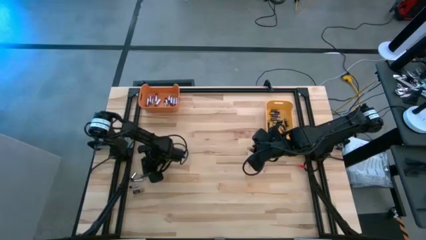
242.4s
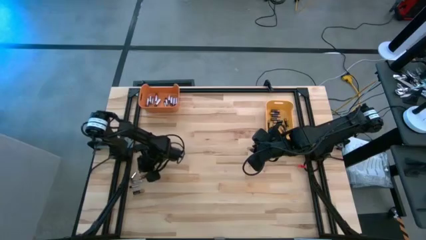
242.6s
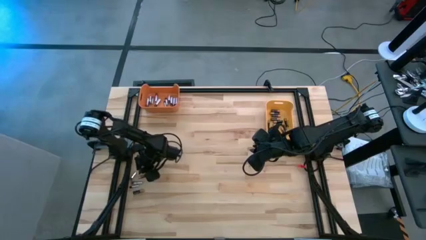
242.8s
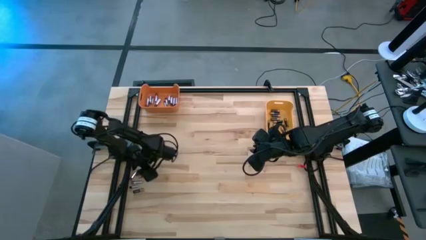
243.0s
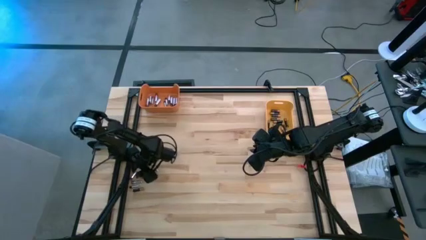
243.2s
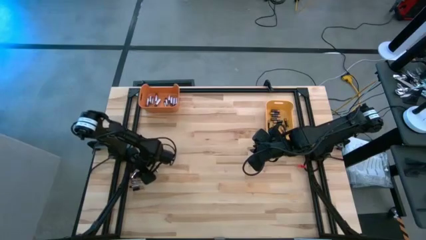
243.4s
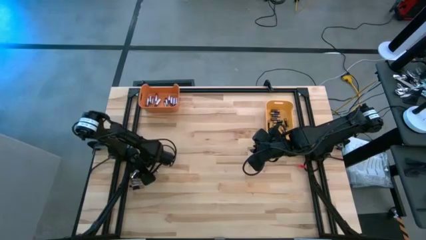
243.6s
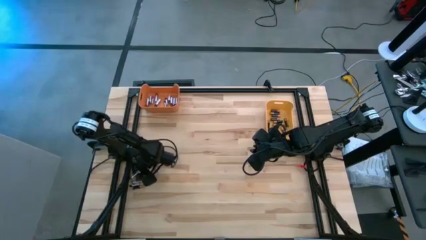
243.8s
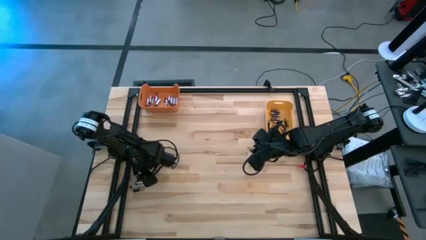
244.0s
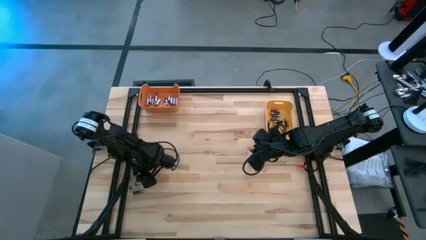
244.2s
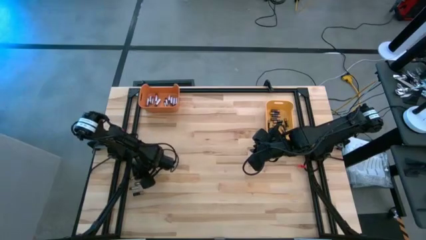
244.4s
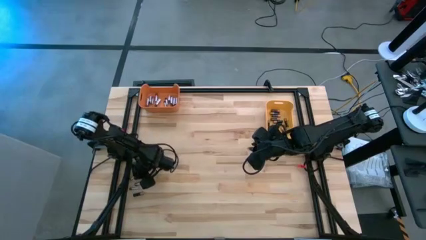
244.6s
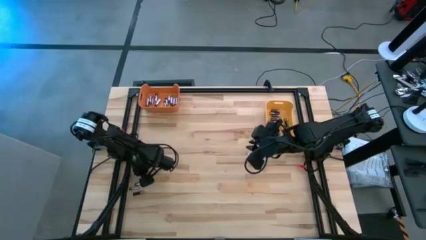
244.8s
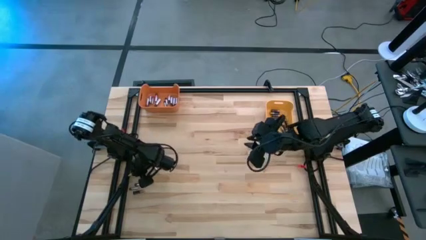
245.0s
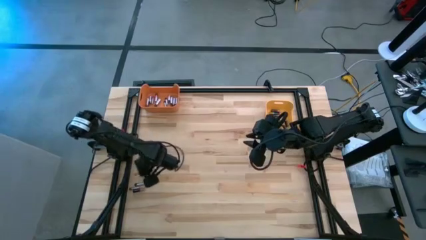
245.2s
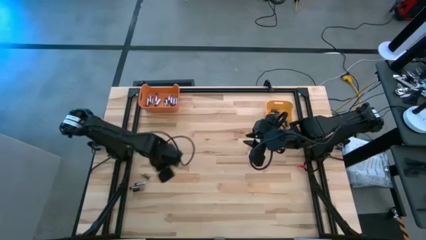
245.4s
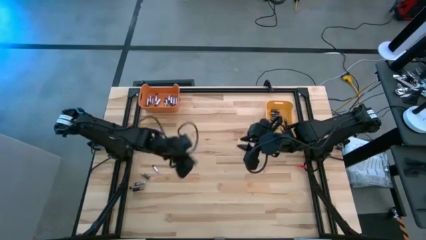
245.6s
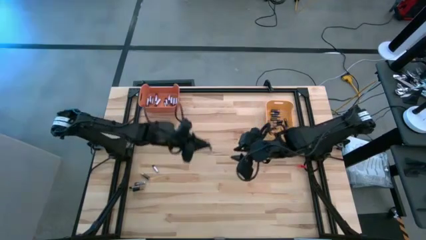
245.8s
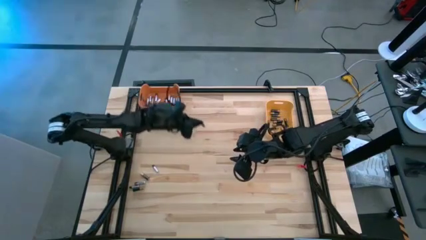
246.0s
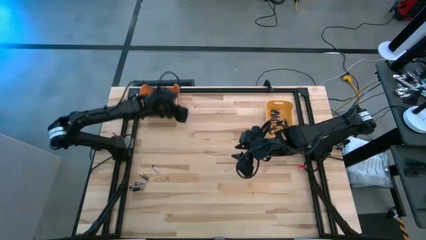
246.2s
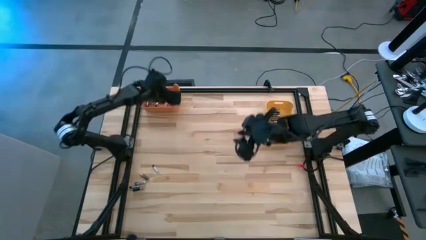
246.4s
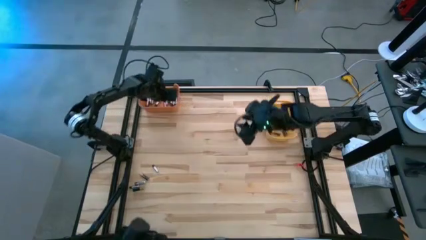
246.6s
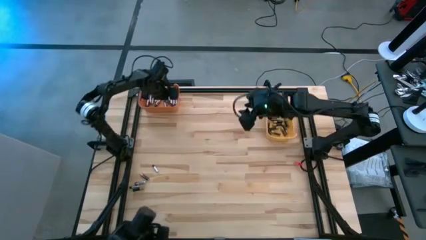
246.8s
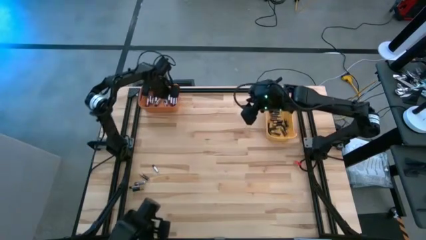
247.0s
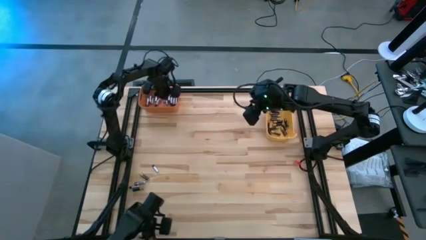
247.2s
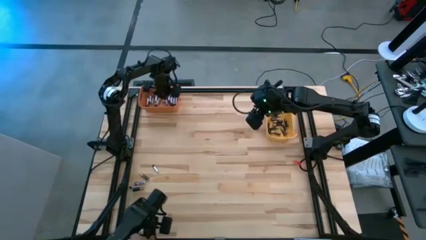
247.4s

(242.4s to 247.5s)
Task: Sort batteries
Put the silver battery into the orange bin

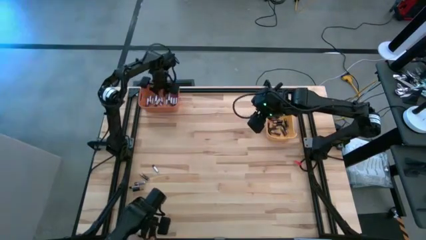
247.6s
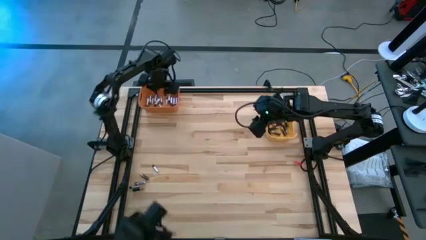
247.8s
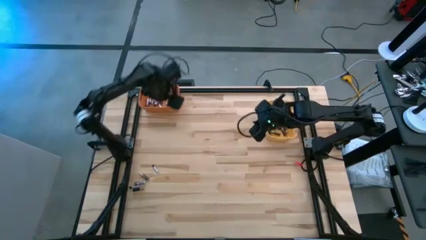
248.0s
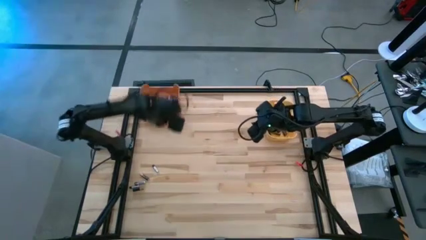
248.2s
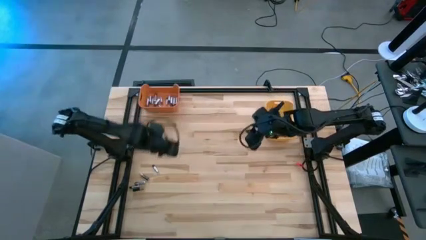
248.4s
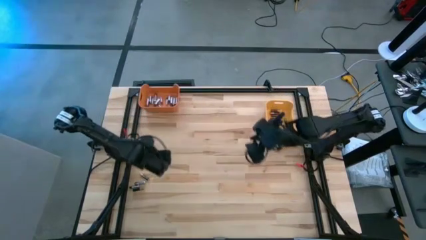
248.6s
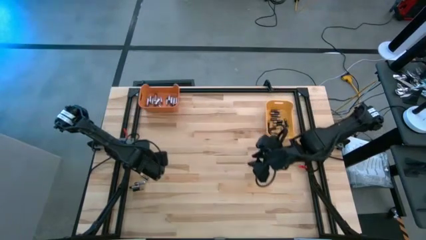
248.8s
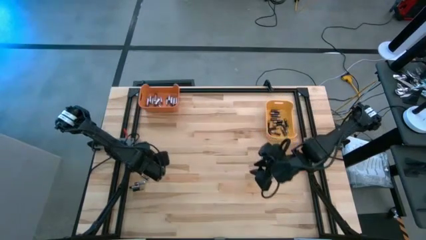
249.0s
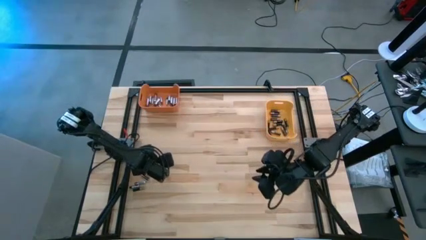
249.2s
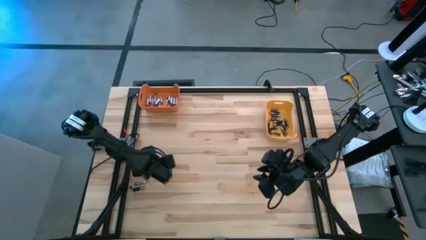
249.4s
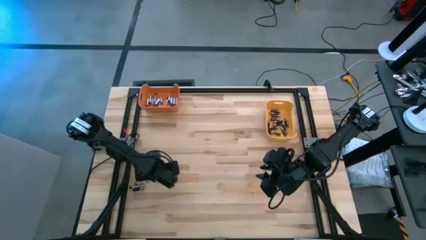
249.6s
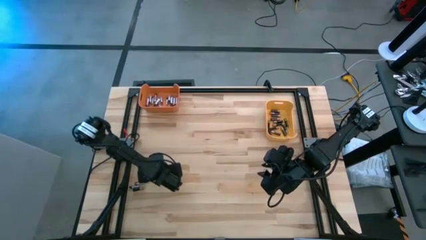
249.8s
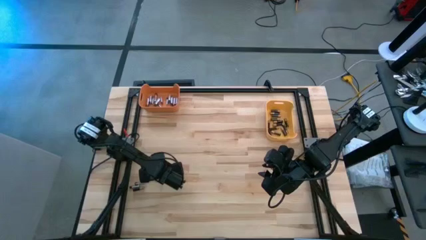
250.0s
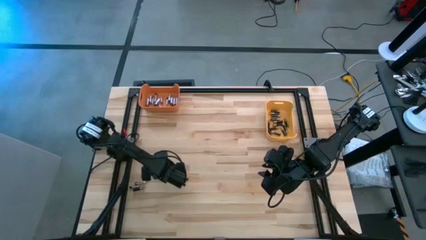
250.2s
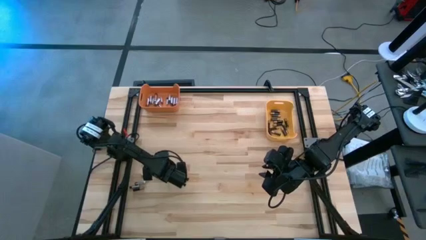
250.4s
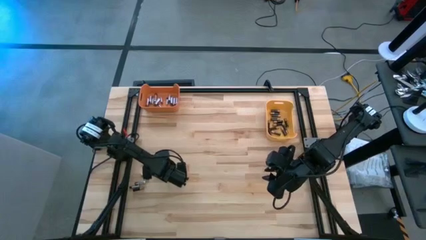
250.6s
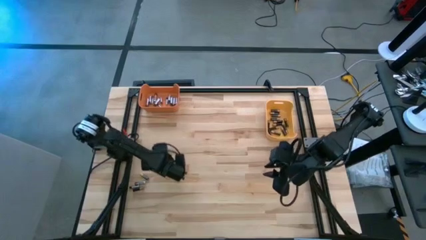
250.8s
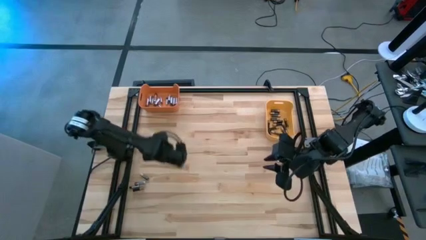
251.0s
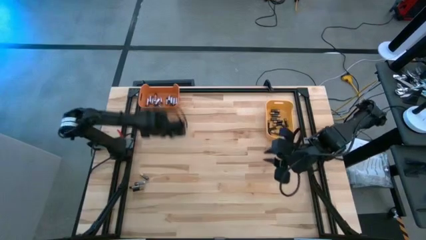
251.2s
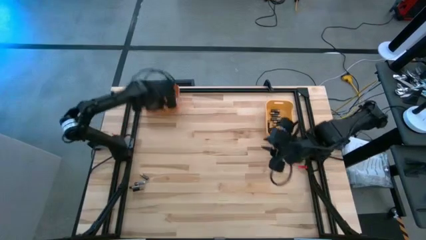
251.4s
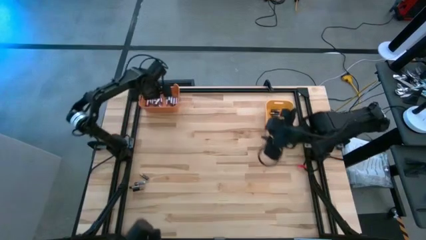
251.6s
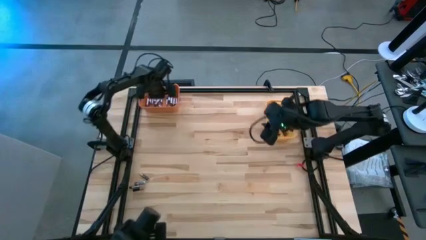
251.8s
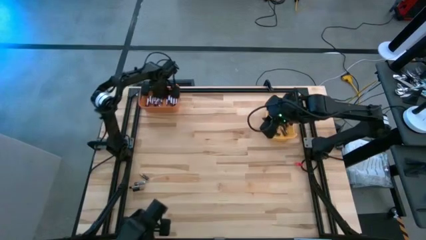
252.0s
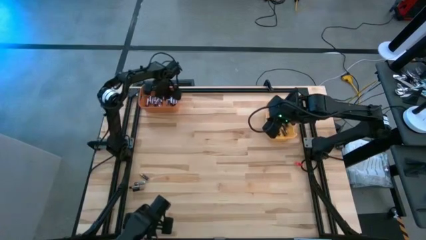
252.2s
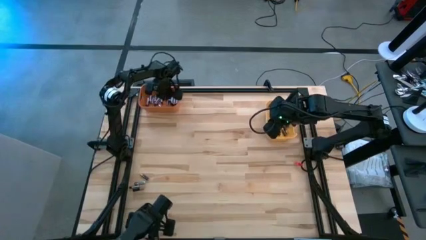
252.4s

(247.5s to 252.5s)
Put the silver battery into the orange bin

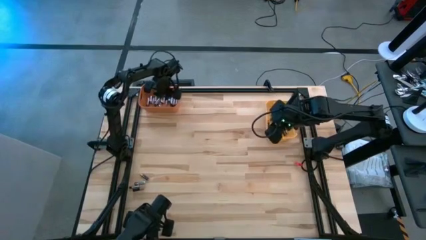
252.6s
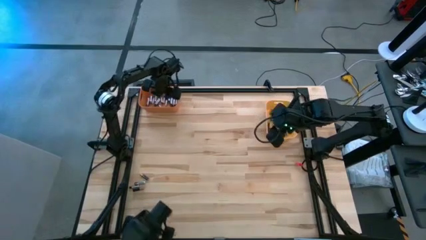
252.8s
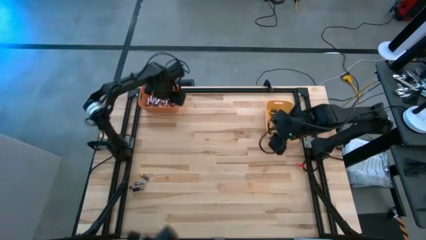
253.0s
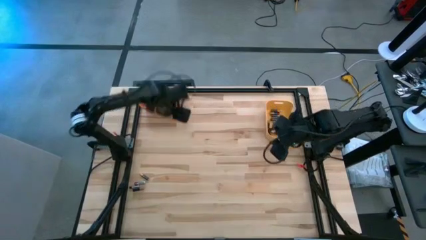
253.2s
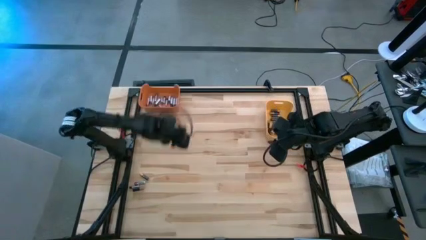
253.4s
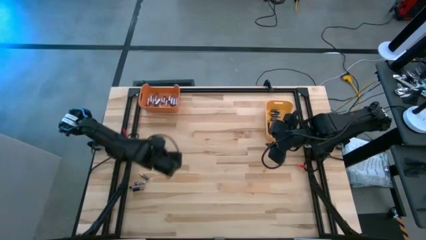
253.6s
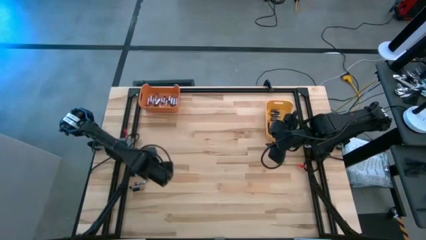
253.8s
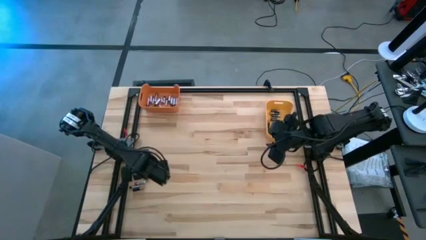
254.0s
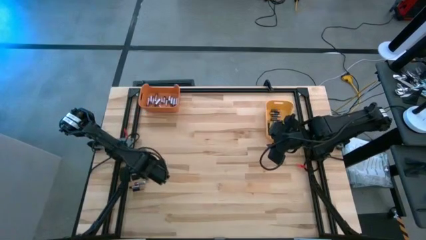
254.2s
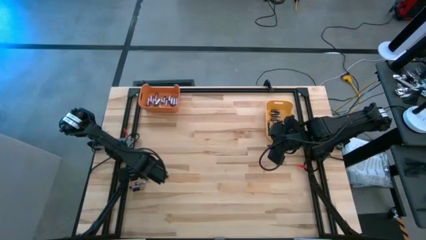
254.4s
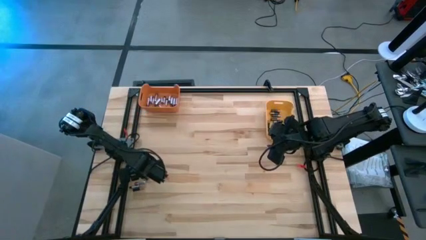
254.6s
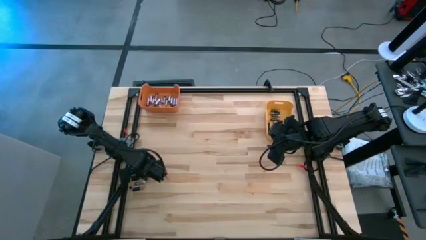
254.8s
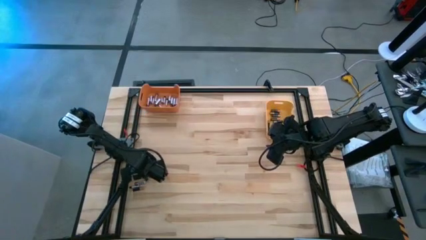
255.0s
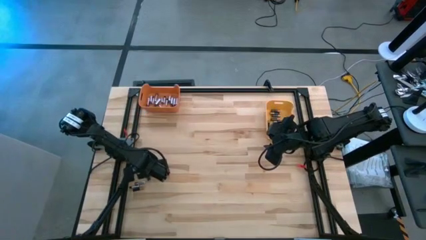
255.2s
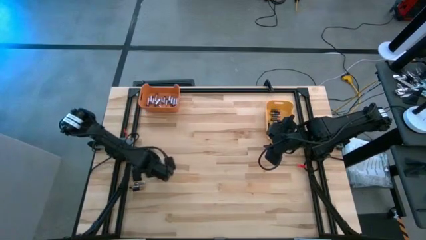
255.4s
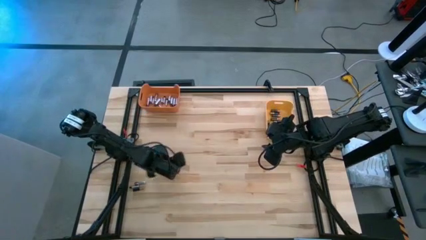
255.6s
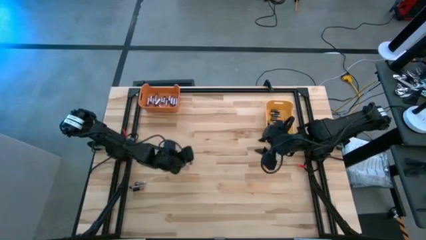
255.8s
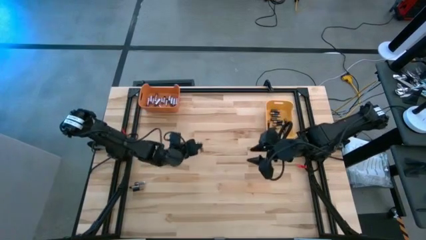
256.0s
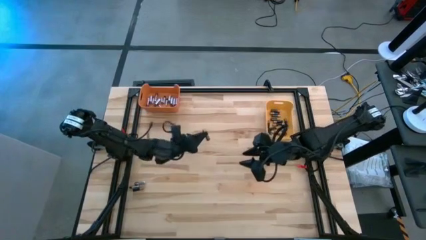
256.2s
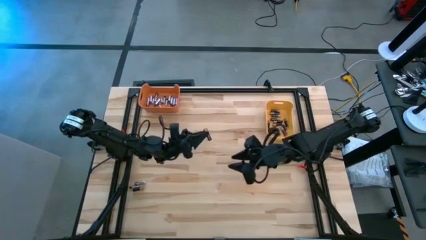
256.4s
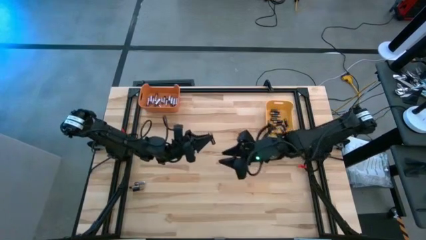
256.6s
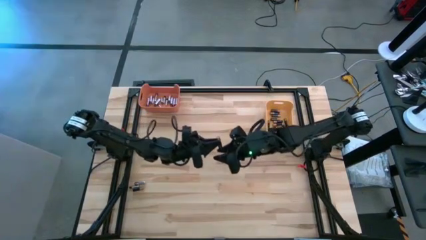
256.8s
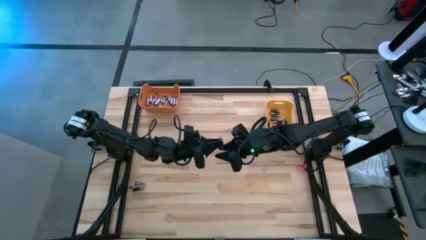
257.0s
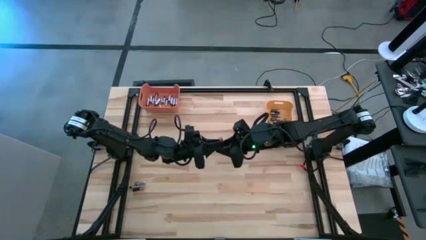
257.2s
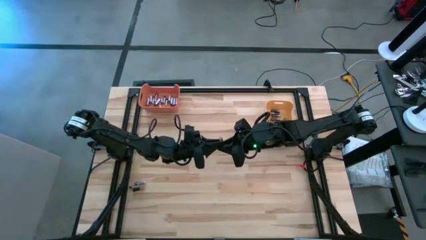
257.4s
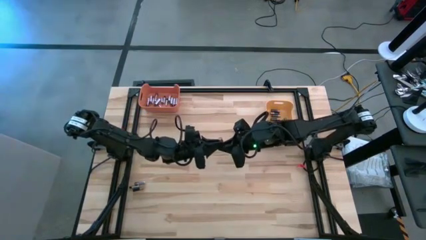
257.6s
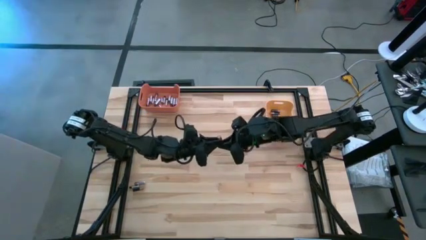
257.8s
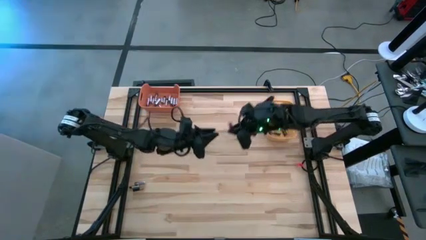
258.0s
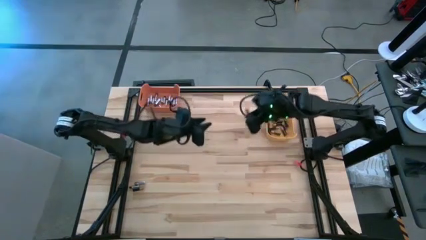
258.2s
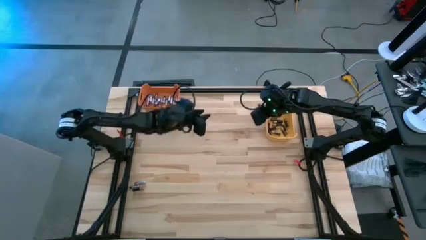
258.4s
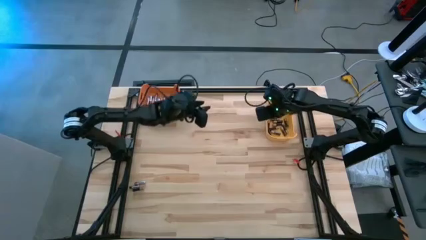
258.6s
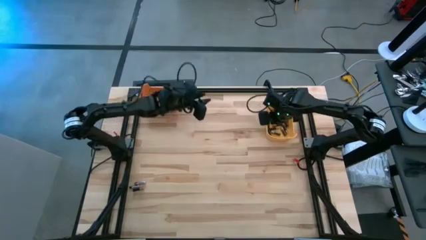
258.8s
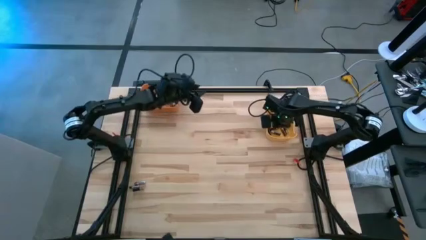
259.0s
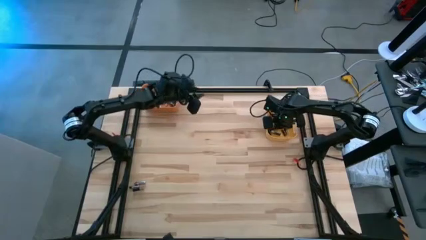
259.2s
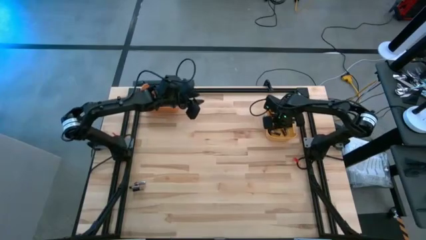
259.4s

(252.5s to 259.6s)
Put the black battery into the yellow bin
